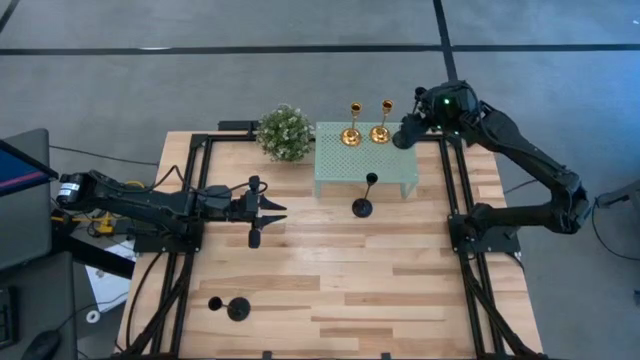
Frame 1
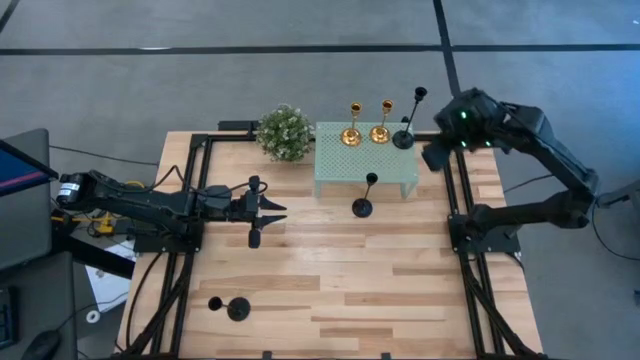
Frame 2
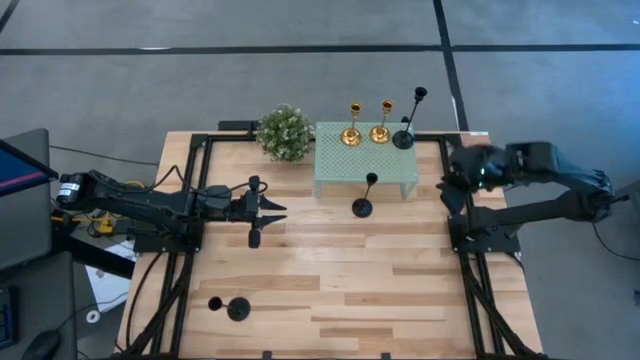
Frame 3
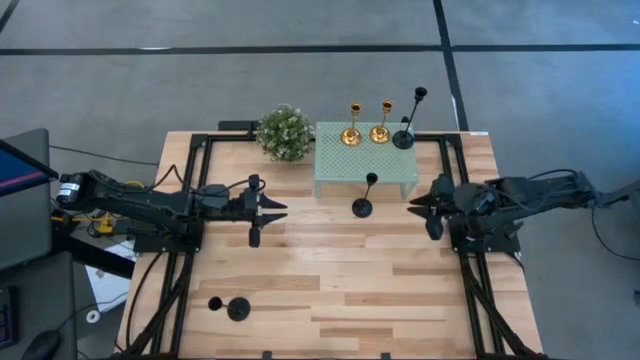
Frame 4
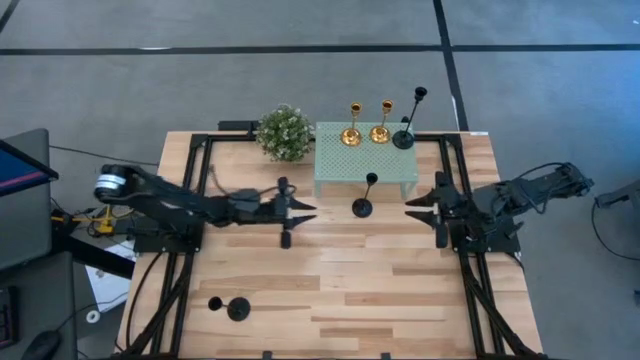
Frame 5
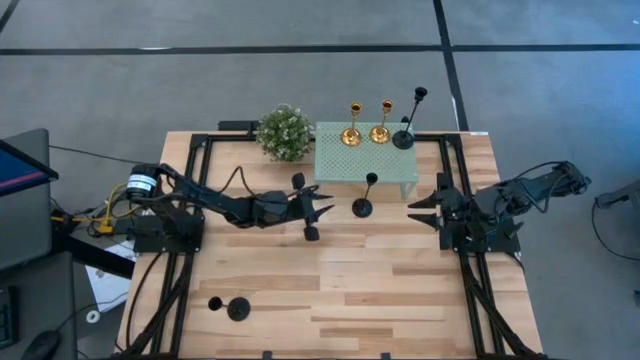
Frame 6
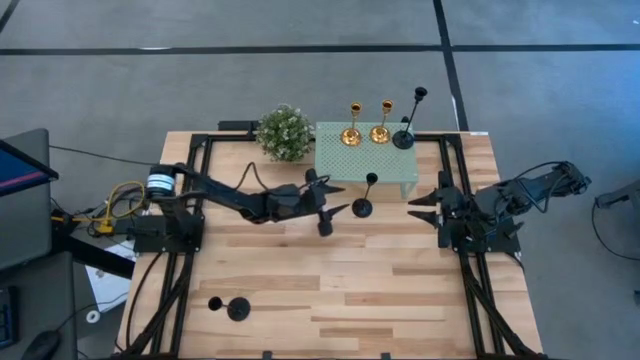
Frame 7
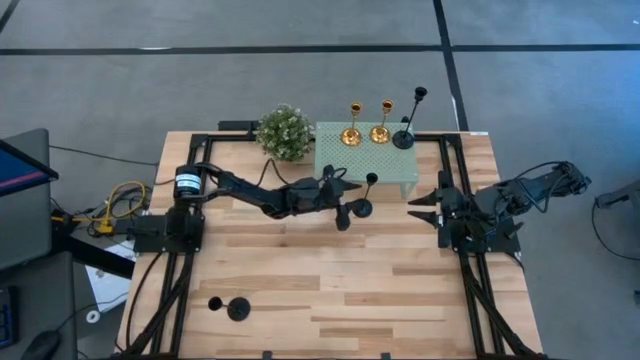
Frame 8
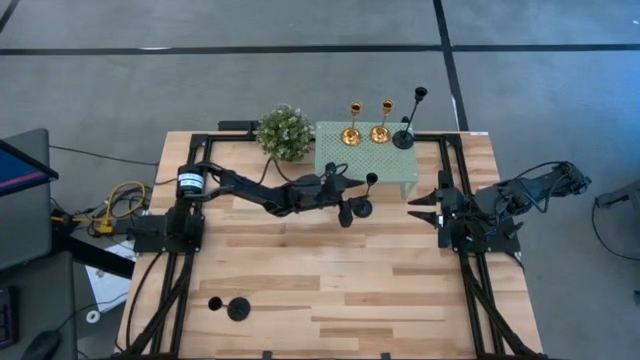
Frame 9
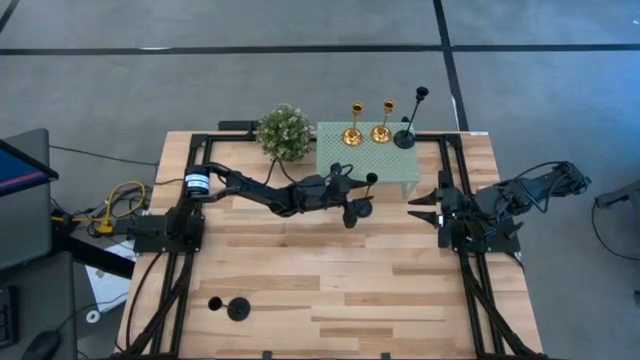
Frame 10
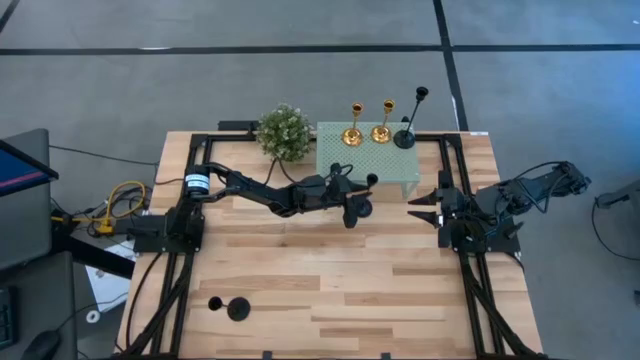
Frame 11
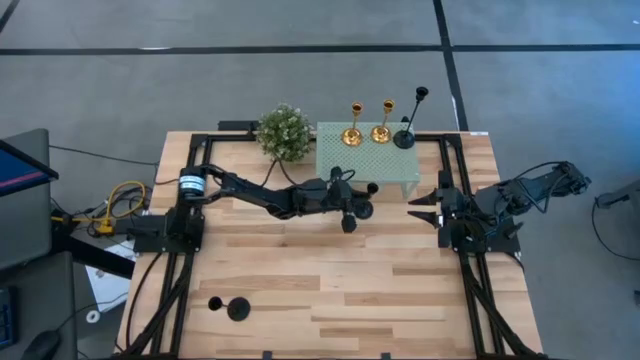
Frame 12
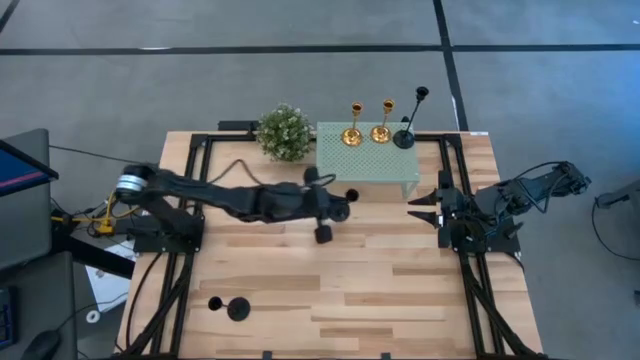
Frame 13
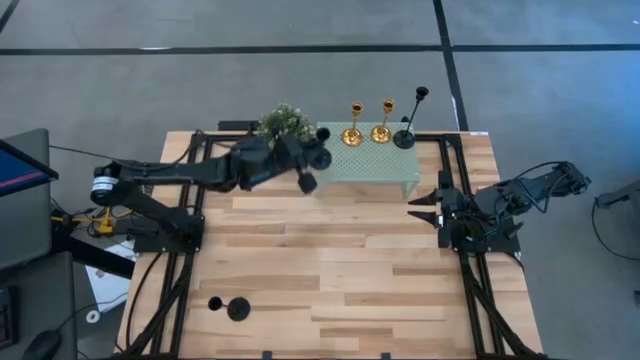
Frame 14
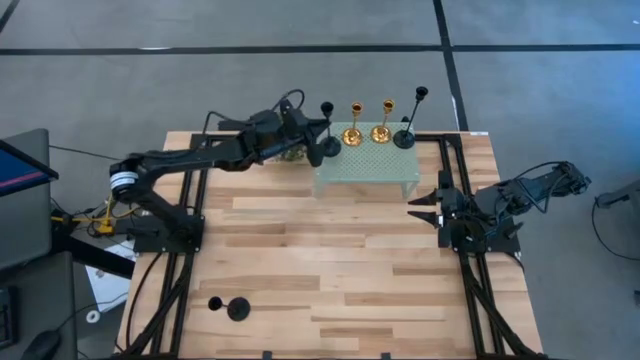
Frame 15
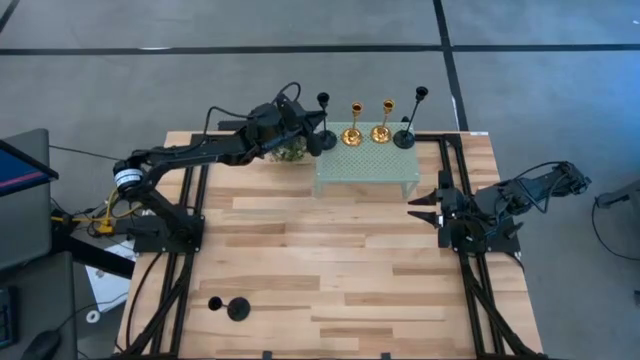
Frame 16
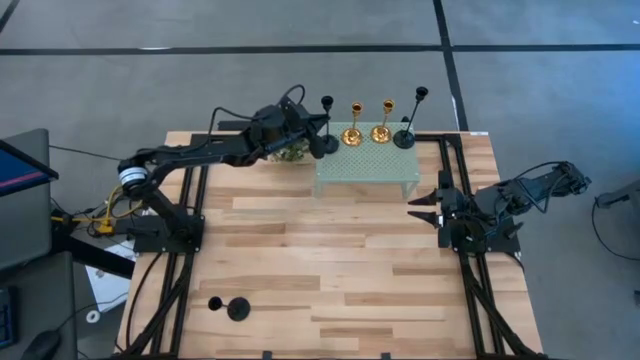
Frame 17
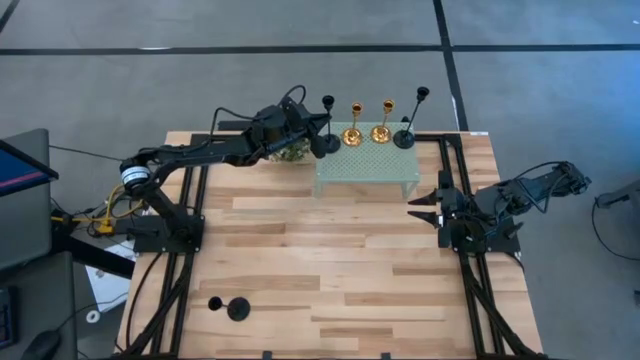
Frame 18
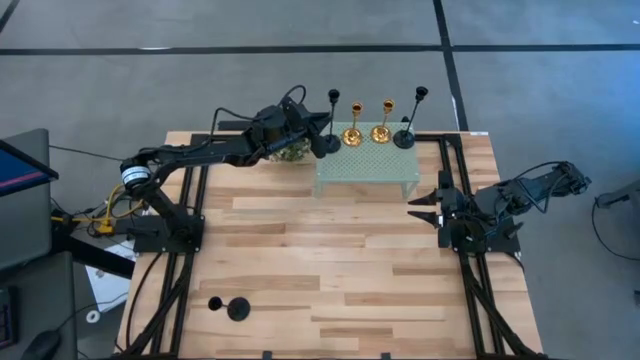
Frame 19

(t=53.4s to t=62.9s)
Task: Pick & Place candle stick holders
Put the top black candle holder on the shelf

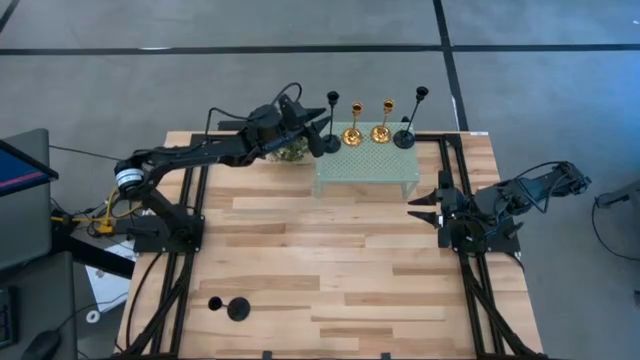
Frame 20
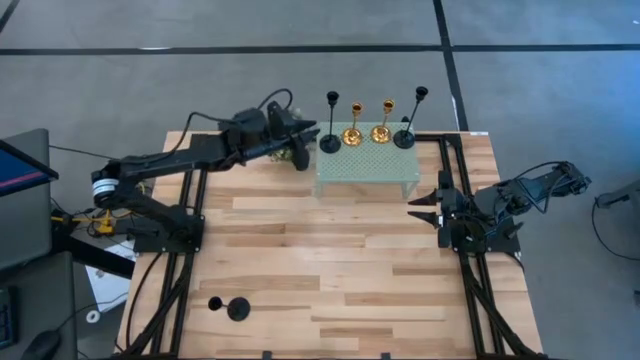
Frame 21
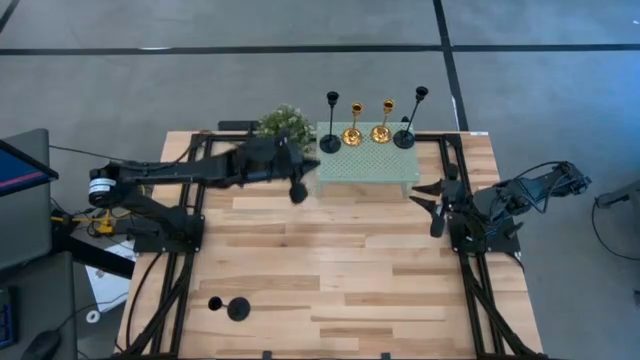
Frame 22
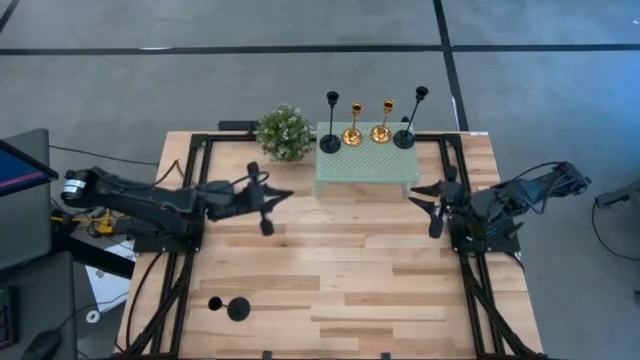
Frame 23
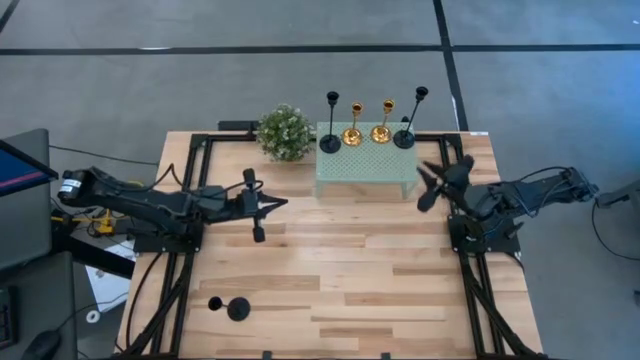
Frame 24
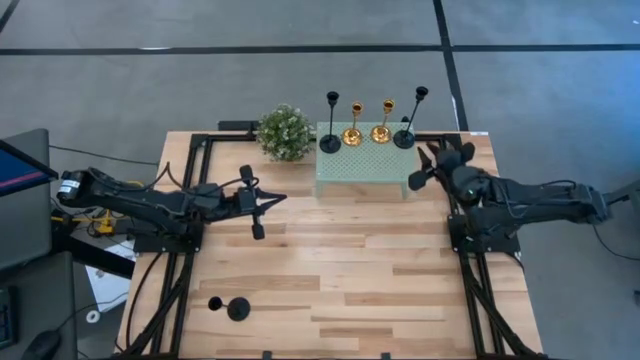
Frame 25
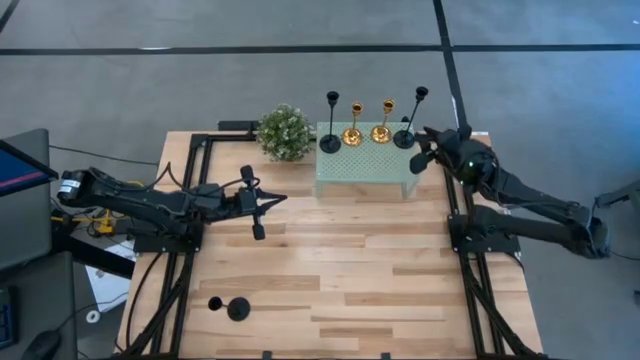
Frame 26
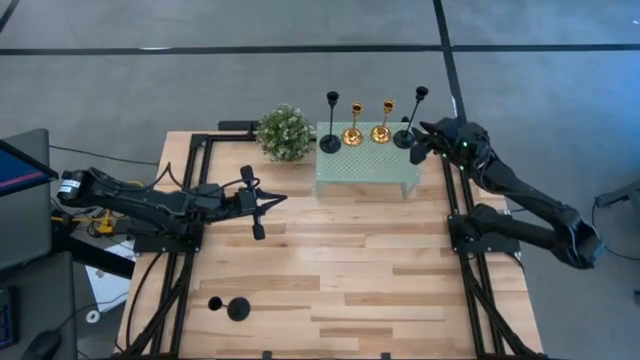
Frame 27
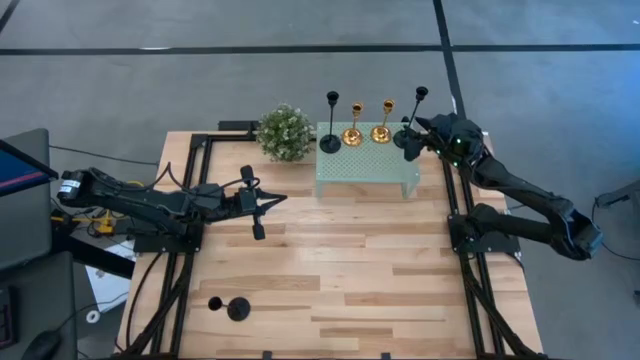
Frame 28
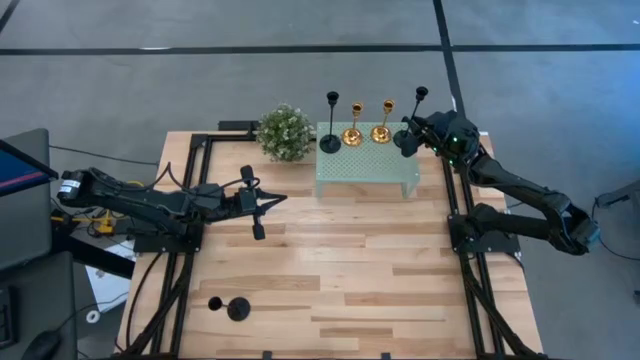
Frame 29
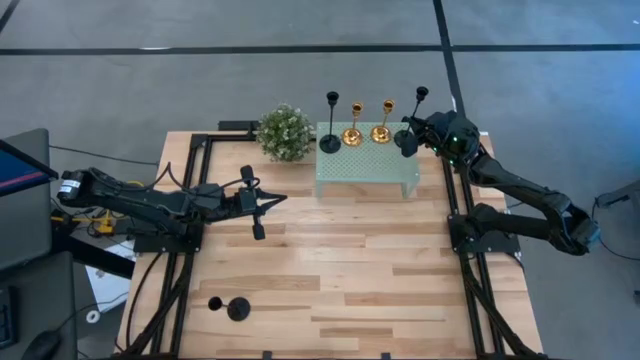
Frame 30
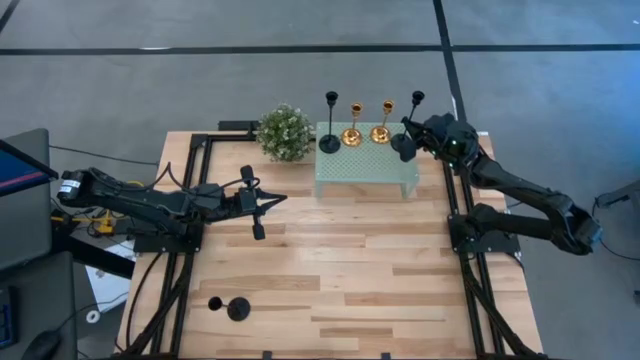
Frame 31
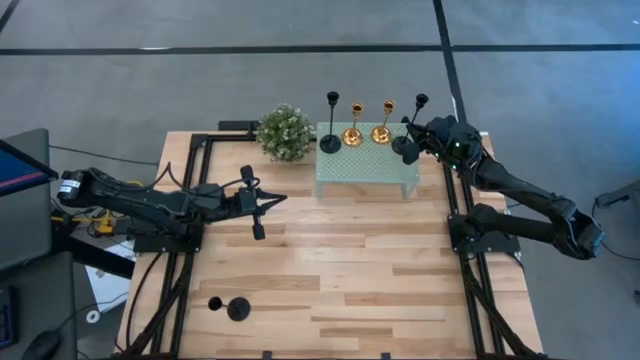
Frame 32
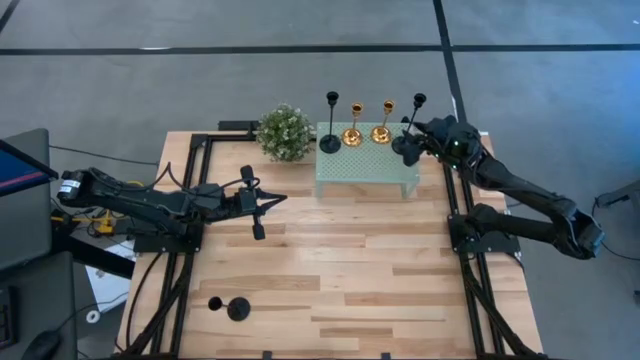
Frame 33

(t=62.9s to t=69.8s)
Adjust the right black candle holder on the shelf

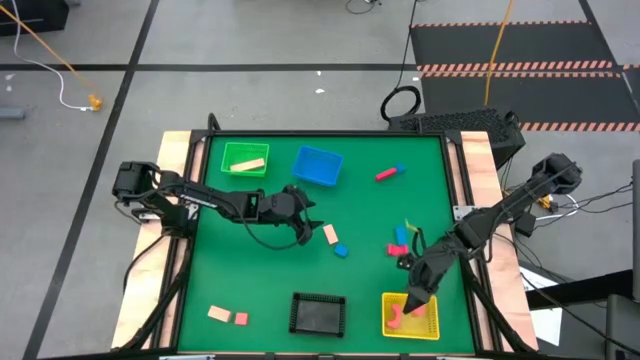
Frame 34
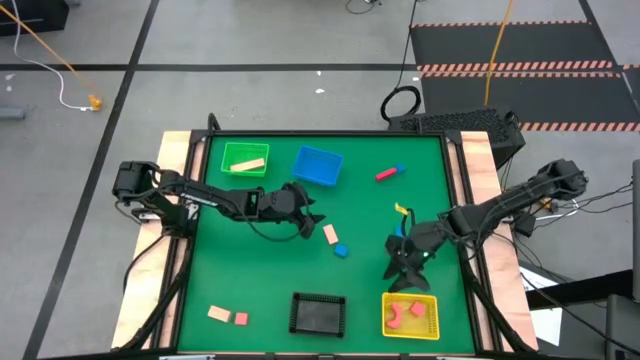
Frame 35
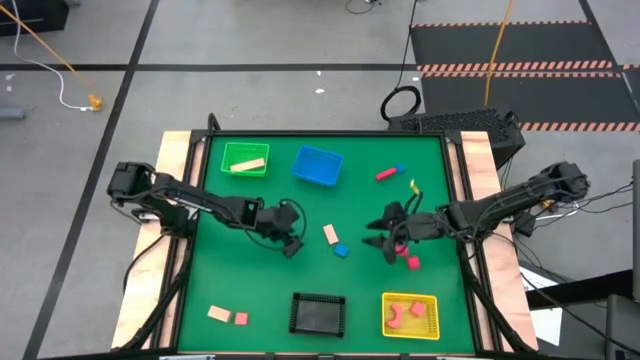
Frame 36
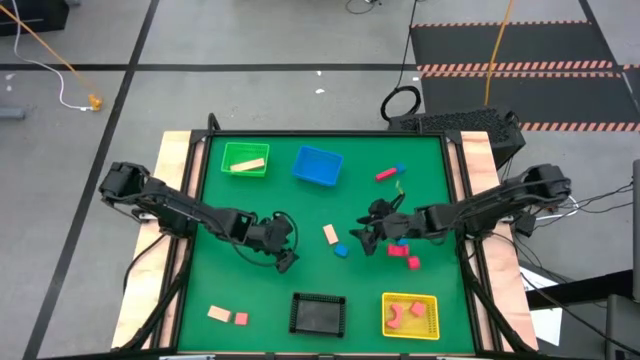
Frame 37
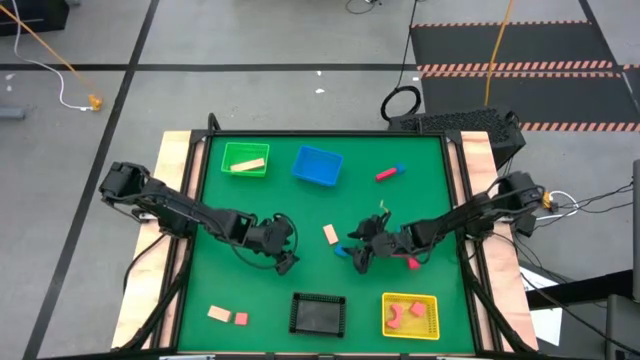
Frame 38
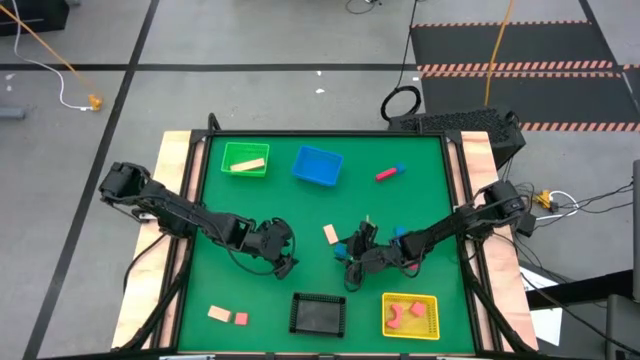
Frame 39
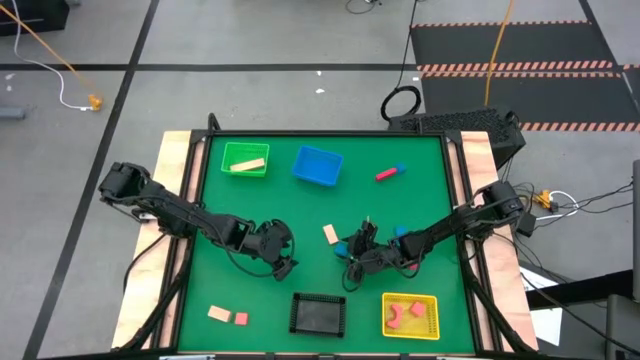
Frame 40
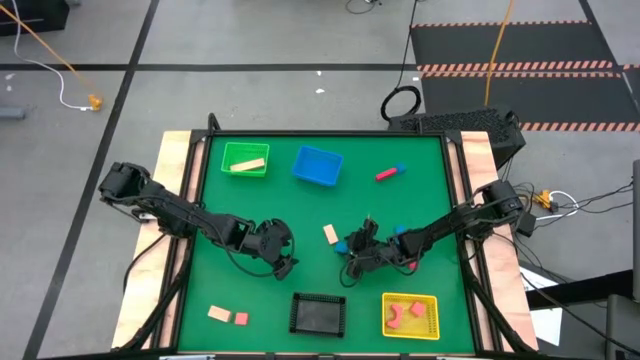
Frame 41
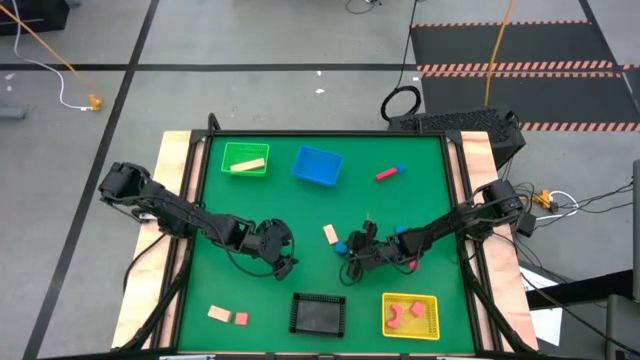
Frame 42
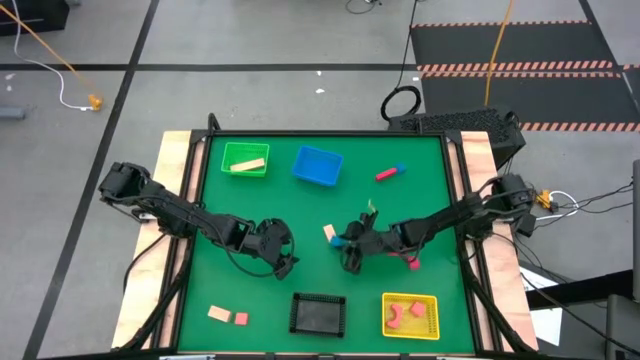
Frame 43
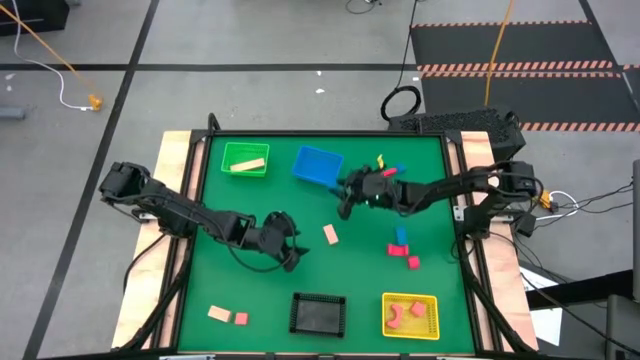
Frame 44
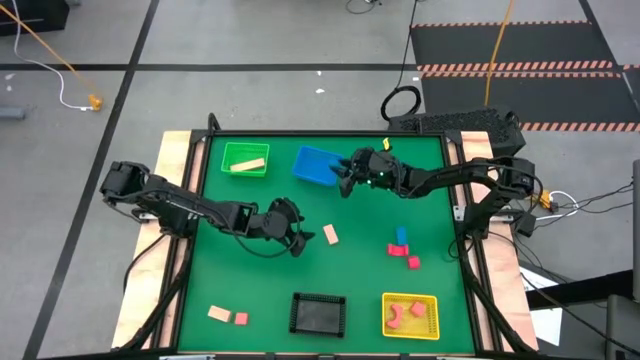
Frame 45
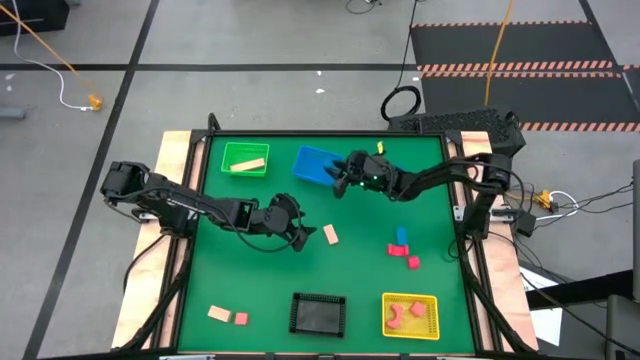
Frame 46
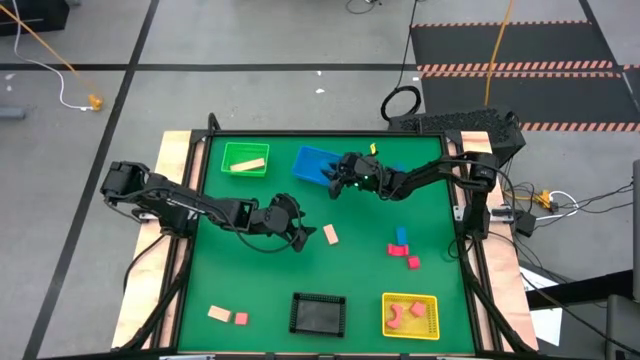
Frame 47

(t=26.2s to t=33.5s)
Task: Sort & place blocks by color
Put the left blue wooden block into the blue basket
